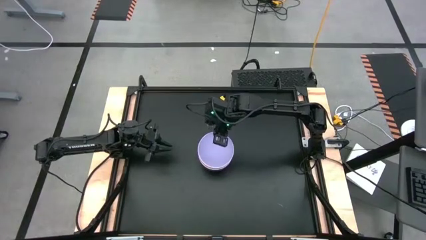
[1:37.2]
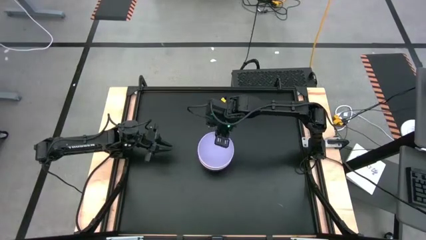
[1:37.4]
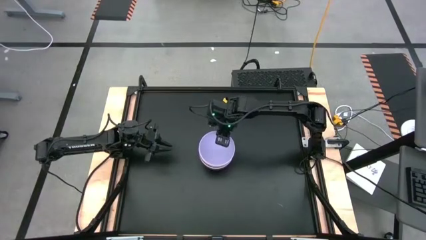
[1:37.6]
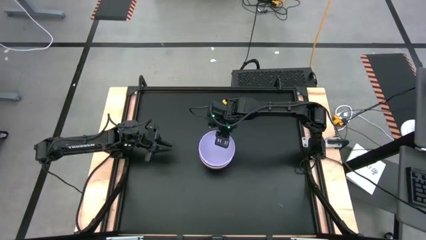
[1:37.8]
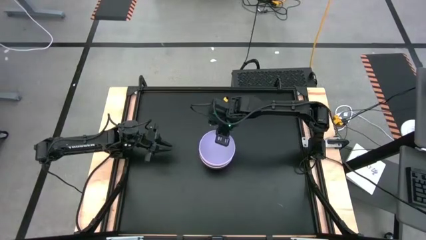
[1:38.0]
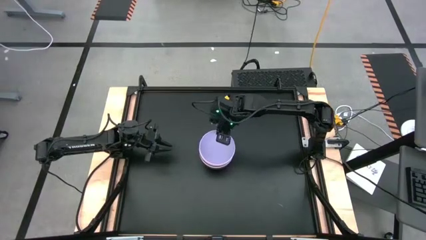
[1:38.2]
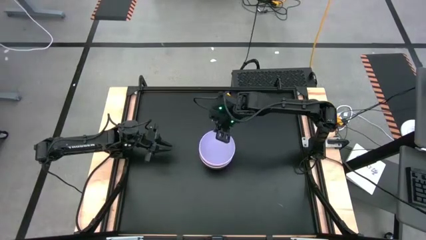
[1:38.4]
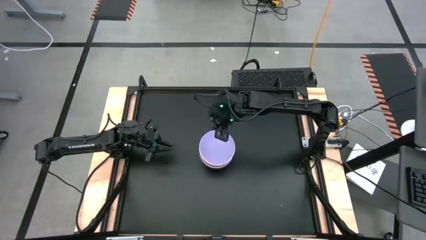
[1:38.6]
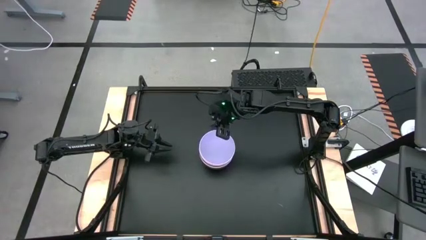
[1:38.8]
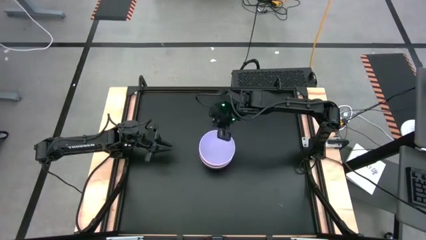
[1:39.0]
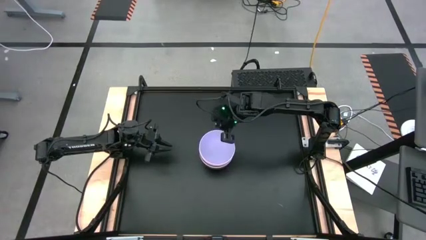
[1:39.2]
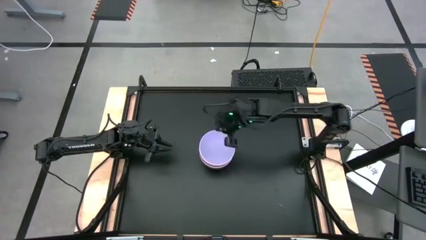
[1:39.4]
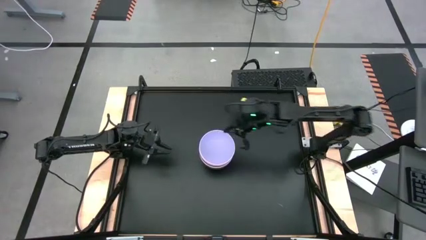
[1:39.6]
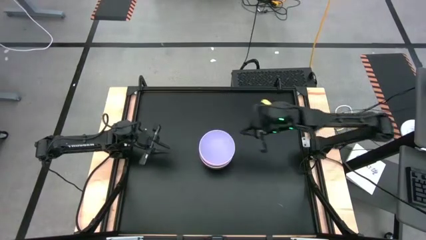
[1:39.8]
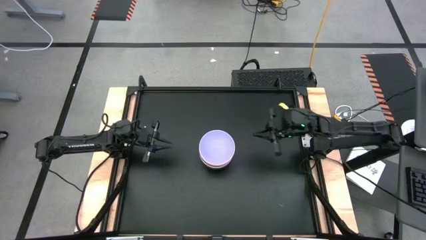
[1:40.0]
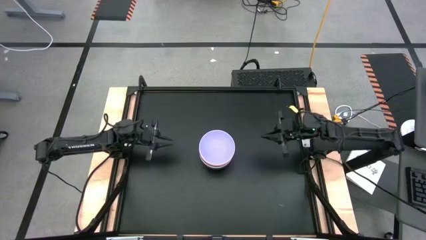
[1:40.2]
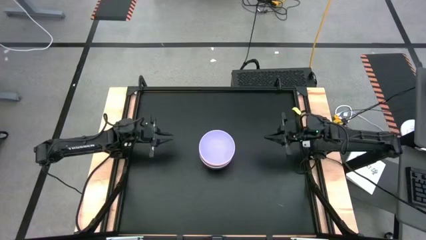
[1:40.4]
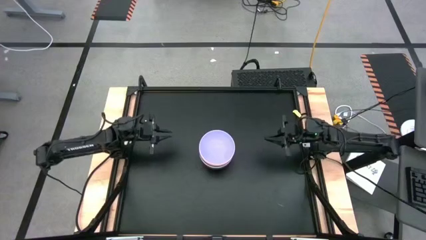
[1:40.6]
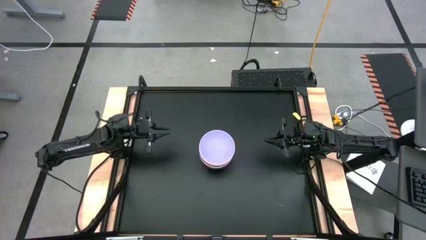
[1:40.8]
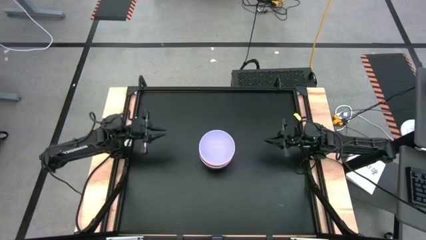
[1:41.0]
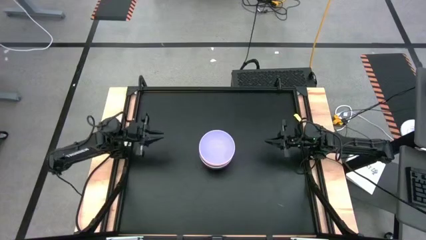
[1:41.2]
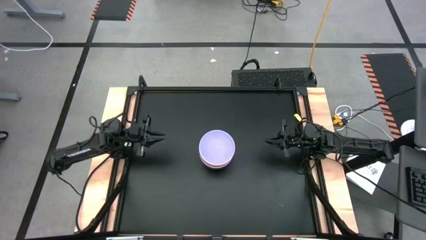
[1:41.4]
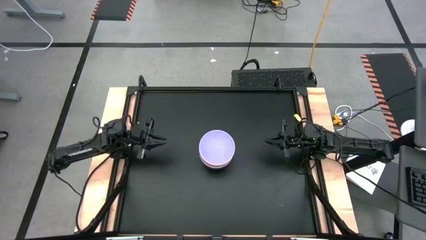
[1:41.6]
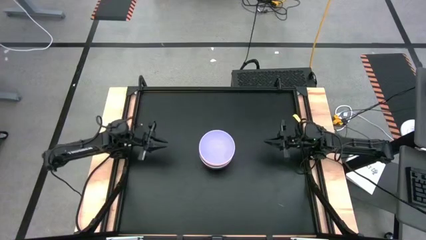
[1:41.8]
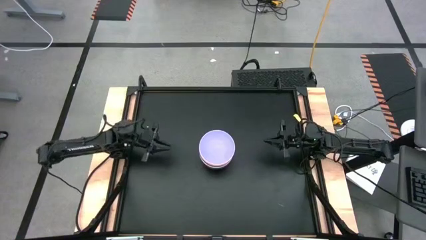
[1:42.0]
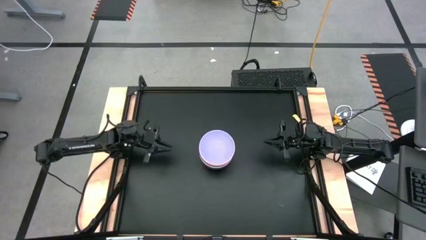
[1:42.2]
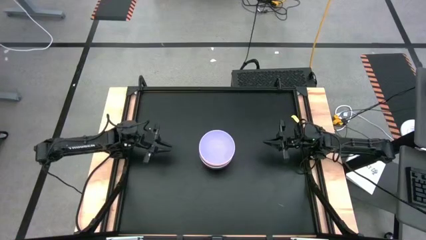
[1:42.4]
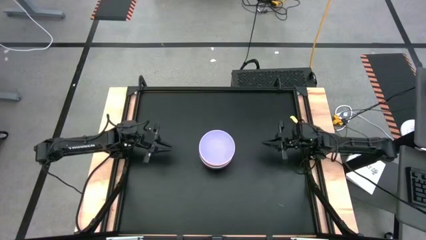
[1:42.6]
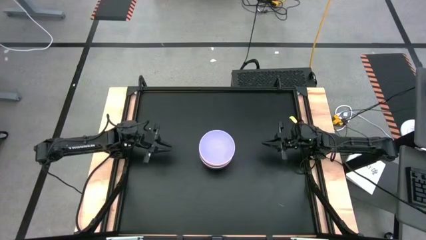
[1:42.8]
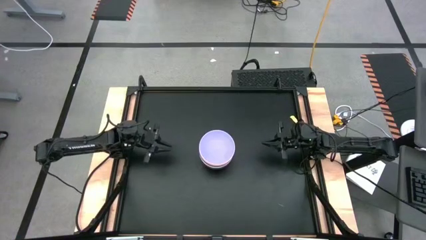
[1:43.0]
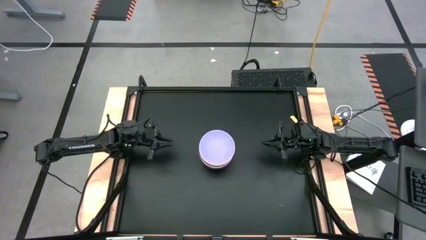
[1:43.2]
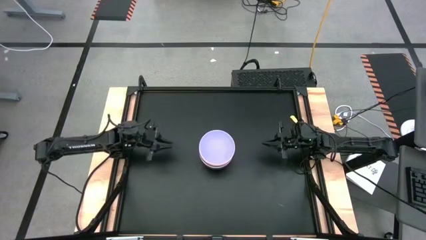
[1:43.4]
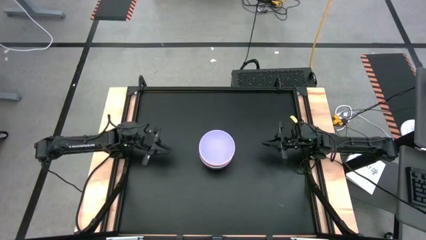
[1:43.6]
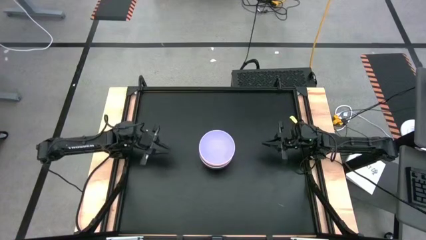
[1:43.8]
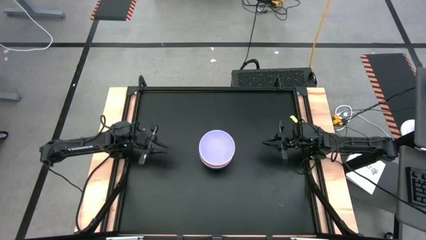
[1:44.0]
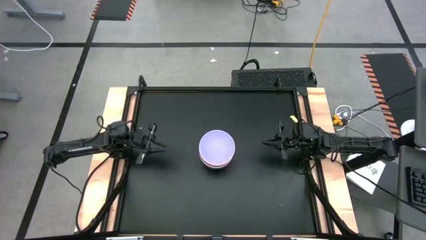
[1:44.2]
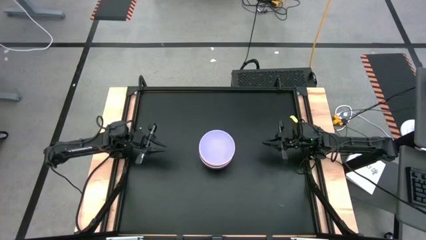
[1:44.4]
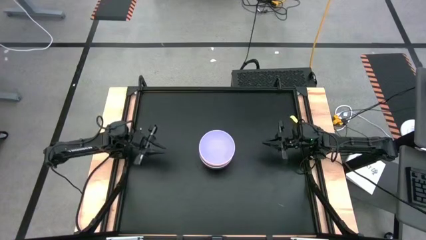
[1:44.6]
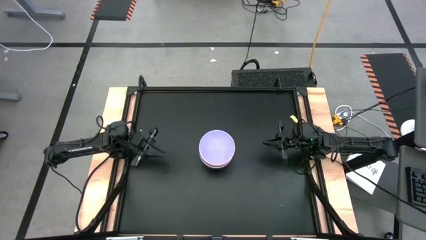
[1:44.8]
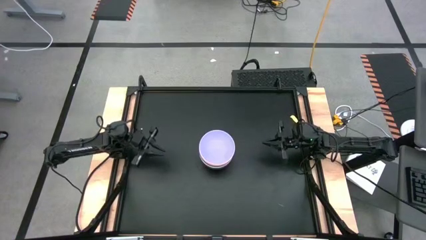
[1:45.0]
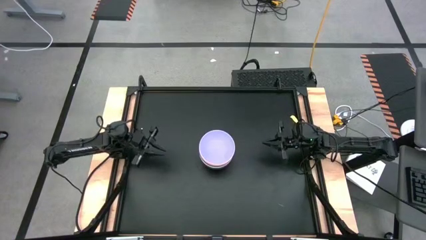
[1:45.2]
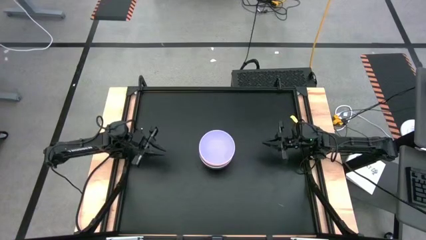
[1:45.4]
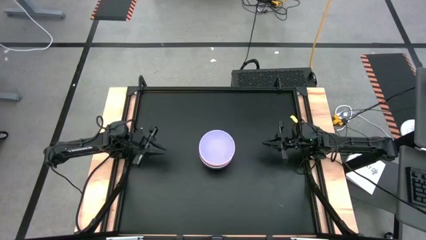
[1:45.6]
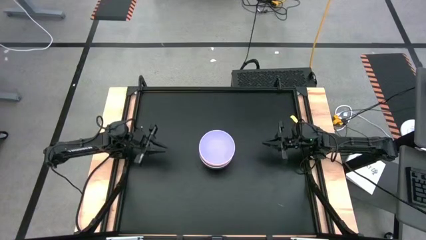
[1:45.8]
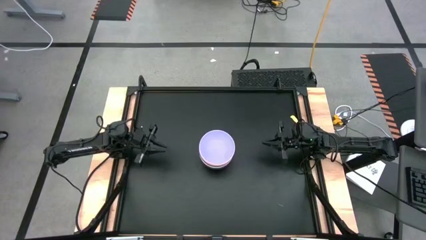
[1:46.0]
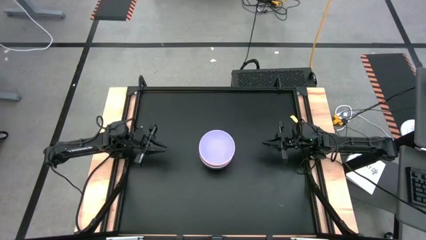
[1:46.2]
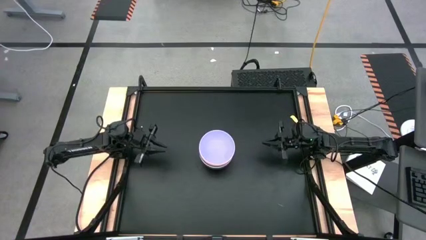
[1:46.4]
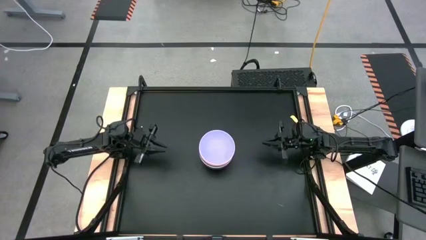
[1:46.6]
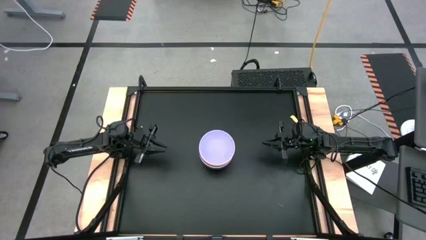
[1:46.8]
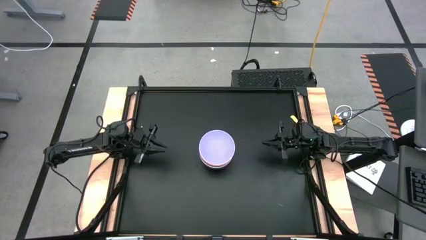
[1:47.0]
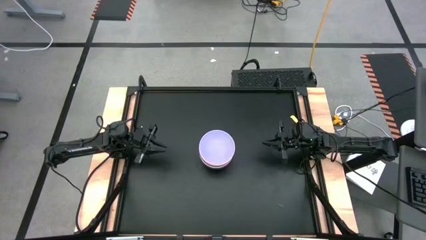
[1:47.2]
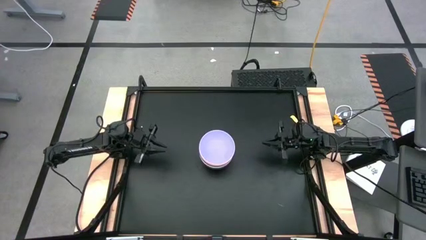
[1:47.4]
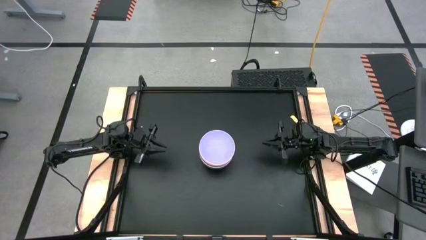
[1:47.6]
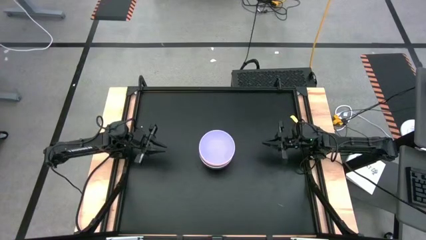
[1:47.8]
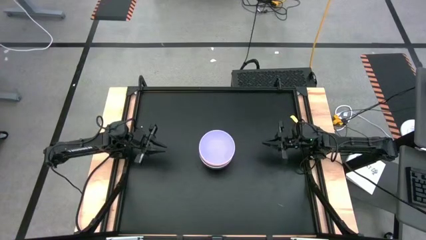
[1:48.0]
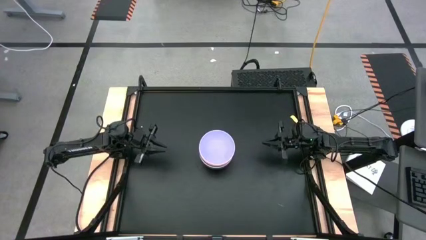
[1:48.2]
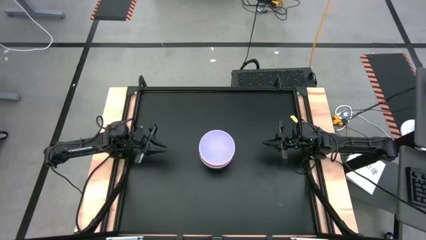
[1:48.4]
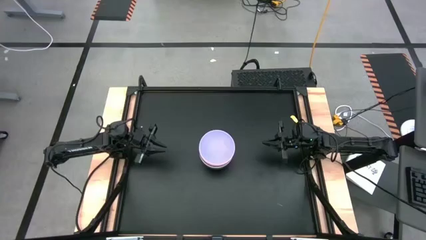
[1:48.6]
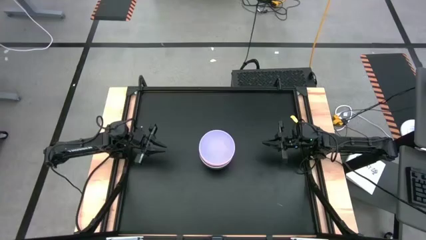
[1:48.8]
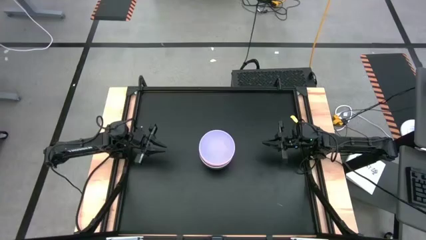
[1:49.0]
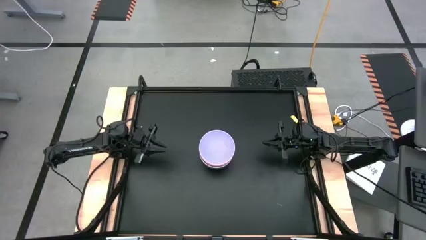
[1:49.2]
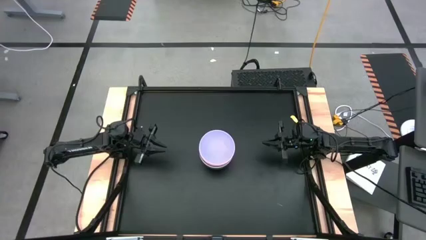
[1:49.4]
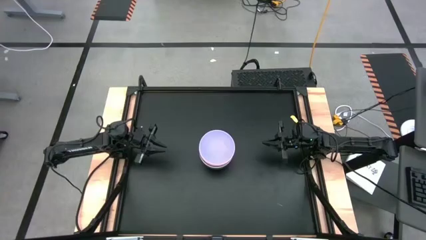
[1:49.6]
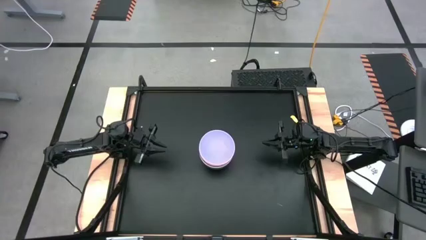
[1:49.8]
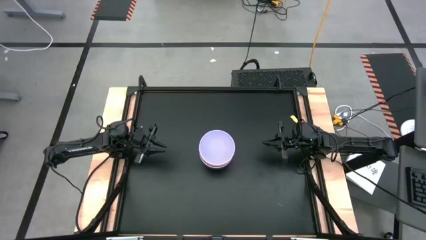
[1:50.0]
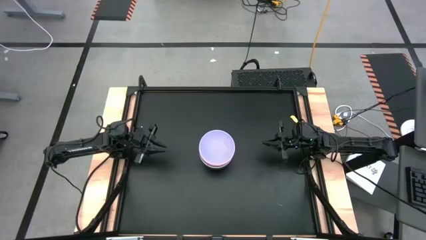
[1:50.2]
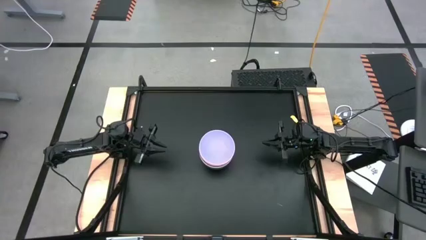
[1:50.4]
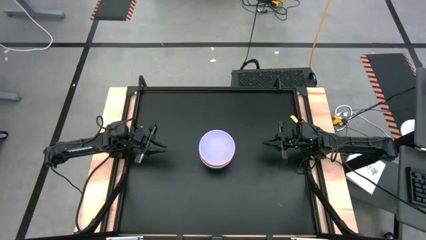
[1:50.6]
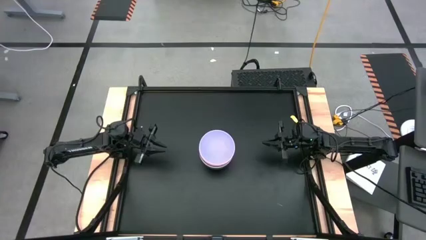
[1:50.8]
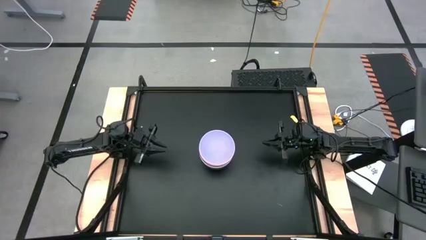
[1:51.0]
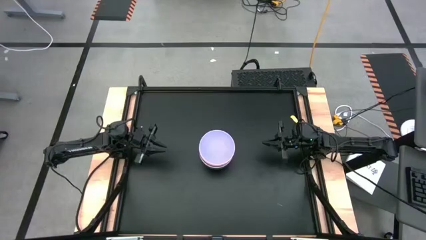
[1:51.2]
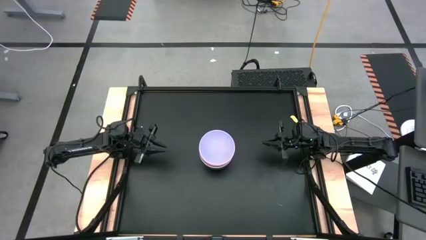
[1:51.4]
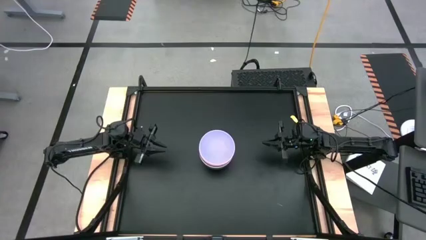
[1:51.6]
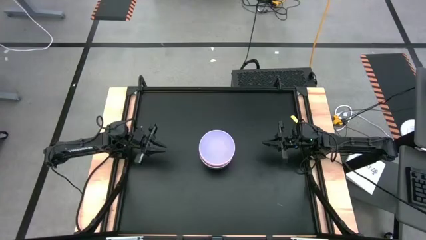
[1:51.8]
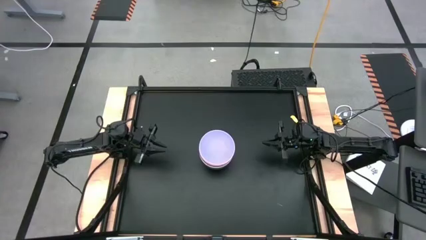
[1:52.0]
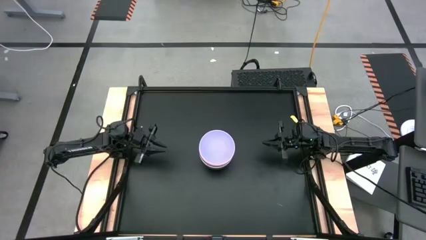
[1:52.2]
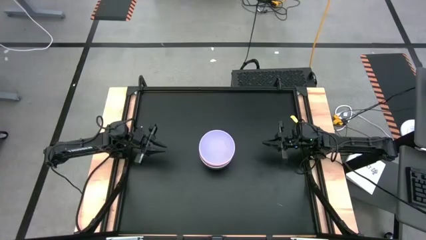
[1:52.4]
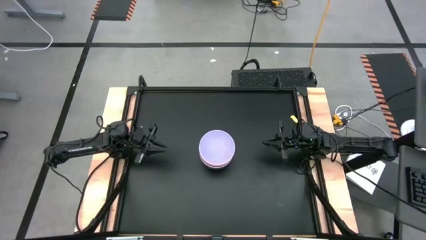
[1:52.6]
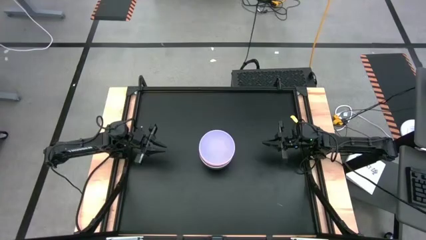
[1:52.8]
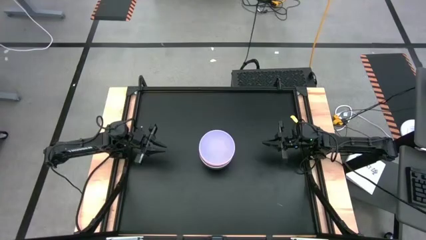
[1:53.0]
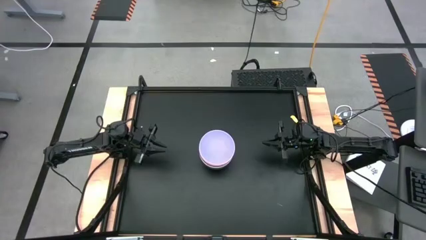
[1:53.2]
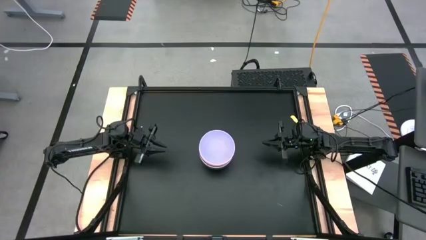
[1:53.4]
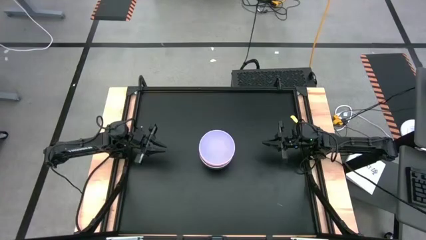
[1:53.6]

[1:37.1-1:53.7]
Task: Nest bowls inside each other
Return to Home Position
